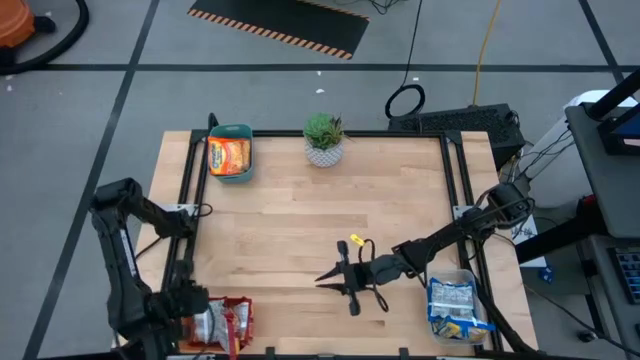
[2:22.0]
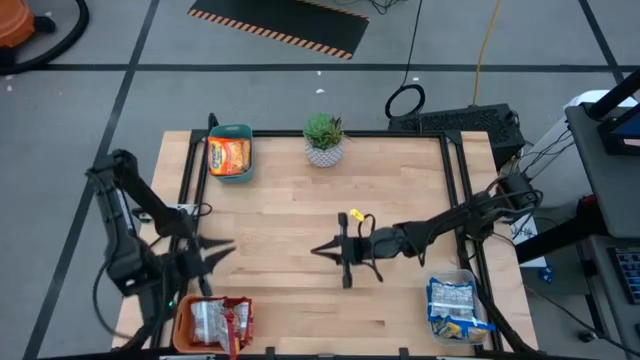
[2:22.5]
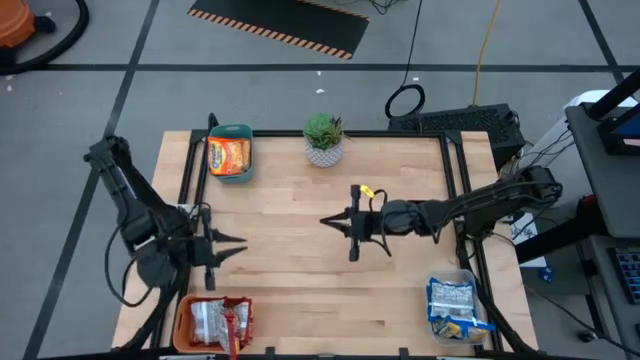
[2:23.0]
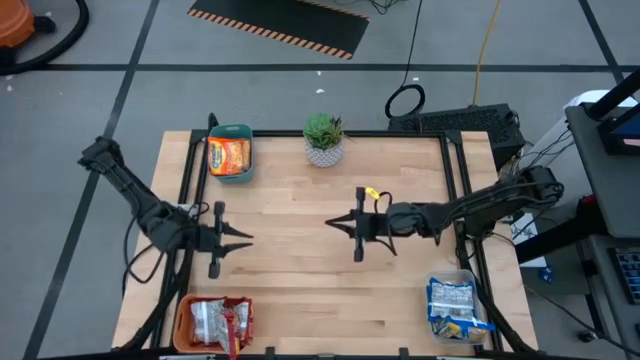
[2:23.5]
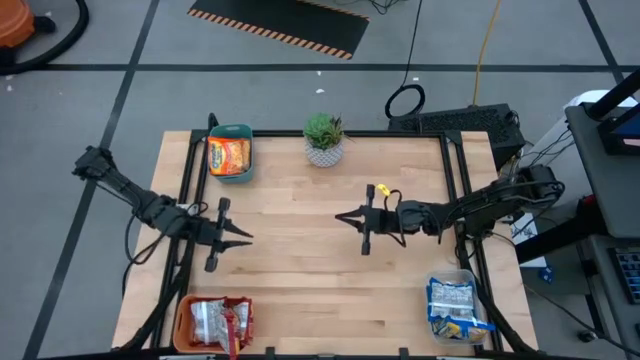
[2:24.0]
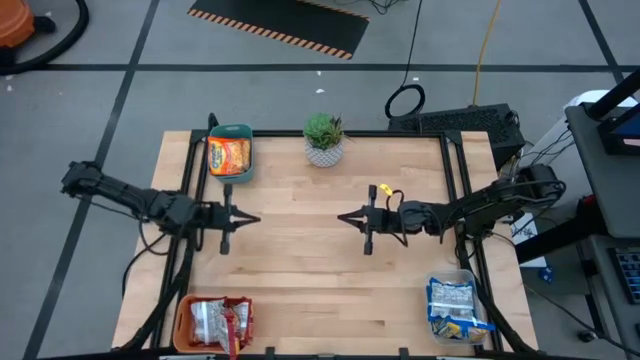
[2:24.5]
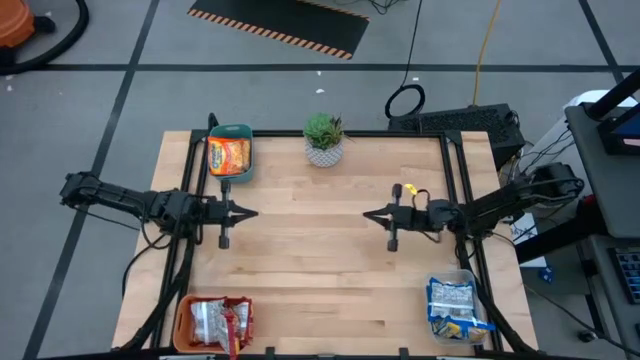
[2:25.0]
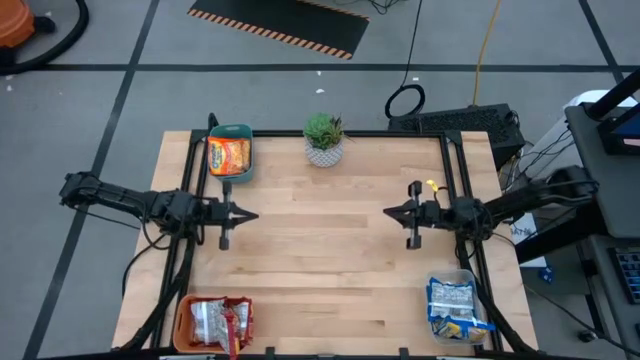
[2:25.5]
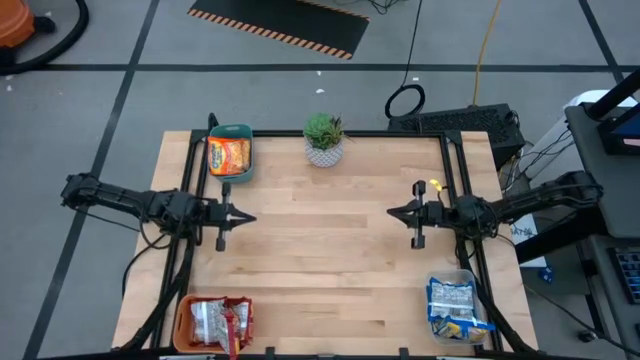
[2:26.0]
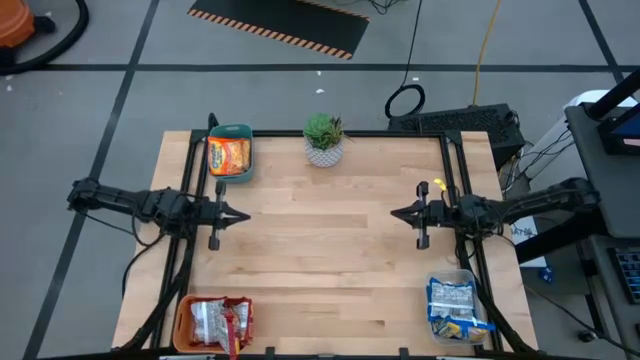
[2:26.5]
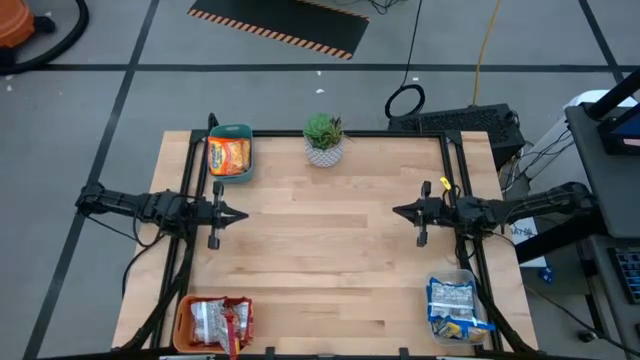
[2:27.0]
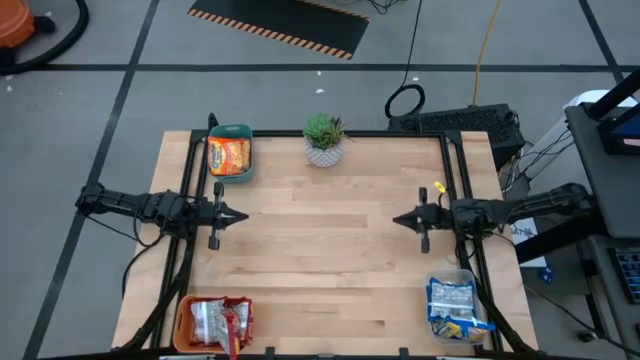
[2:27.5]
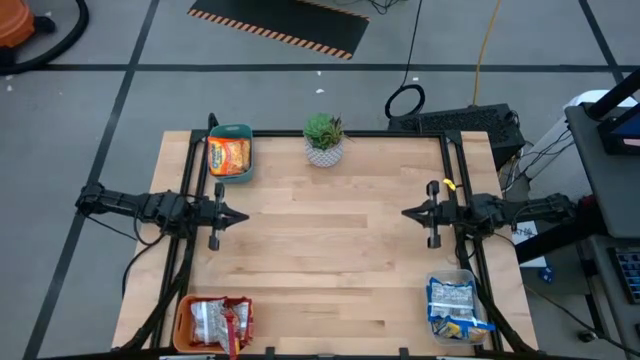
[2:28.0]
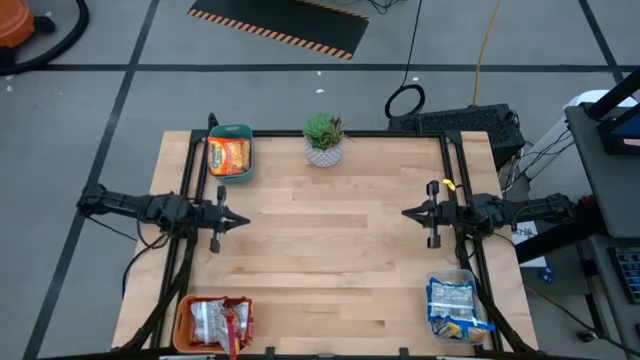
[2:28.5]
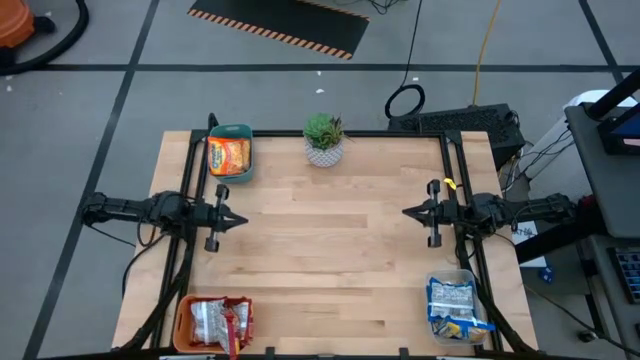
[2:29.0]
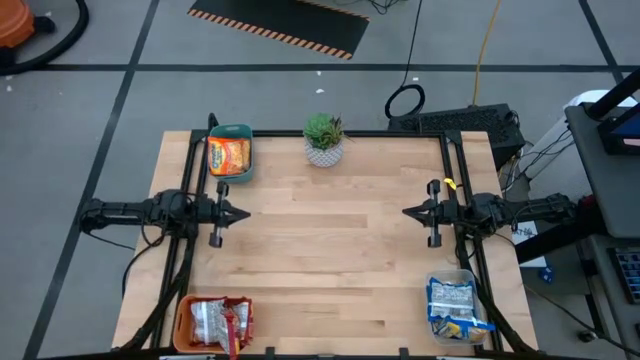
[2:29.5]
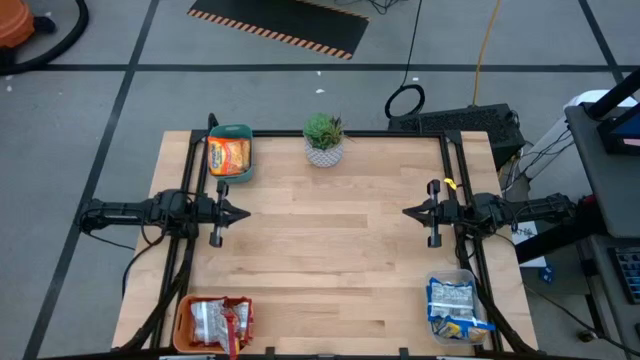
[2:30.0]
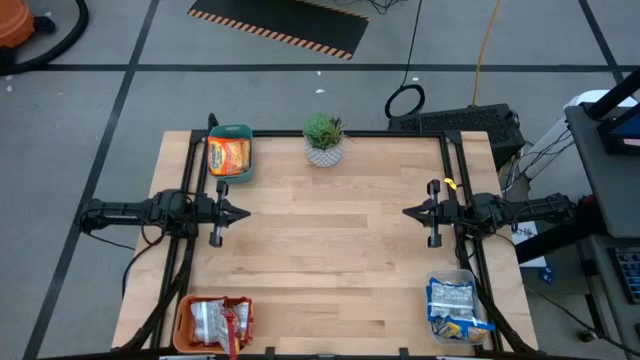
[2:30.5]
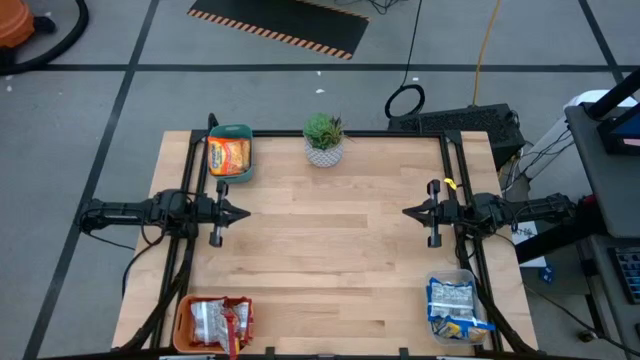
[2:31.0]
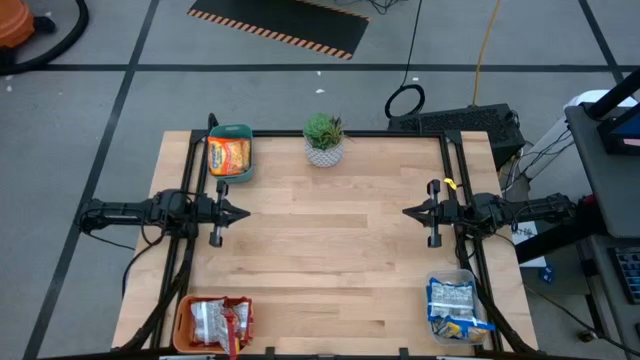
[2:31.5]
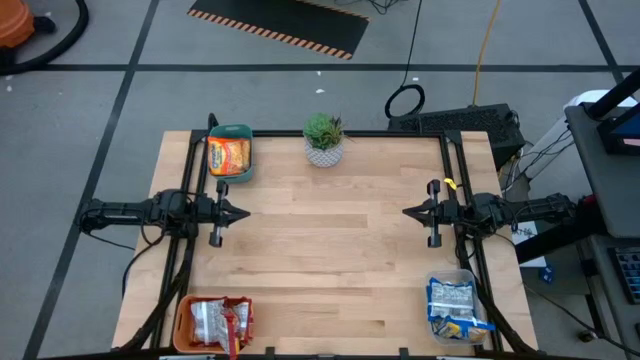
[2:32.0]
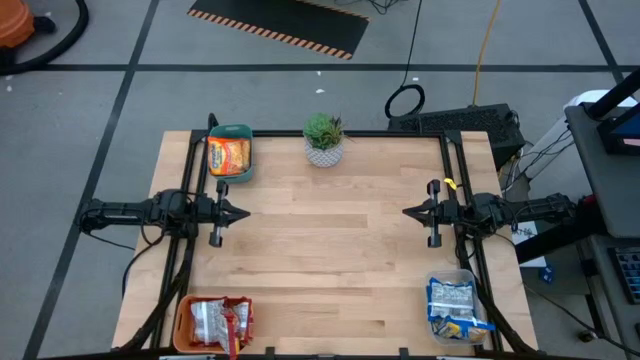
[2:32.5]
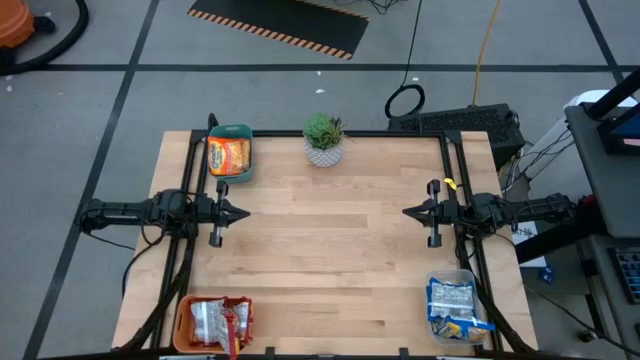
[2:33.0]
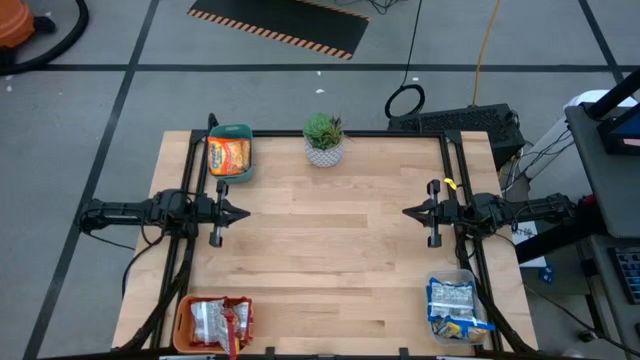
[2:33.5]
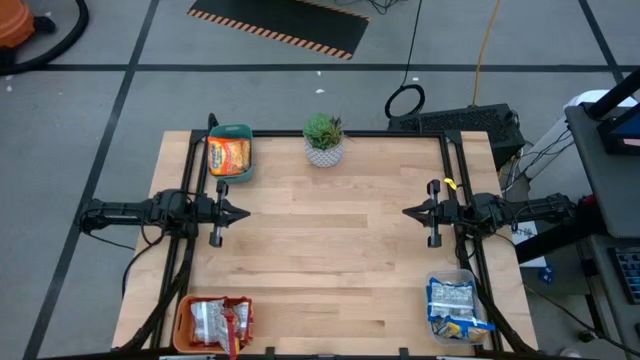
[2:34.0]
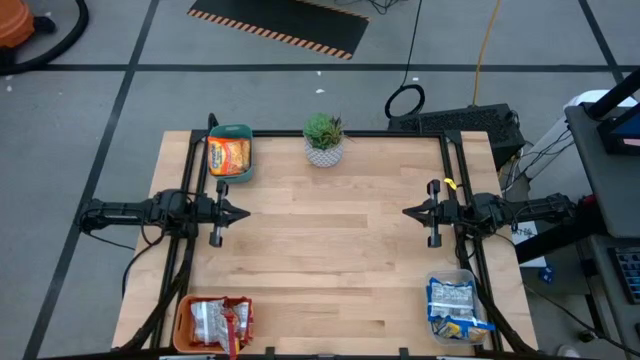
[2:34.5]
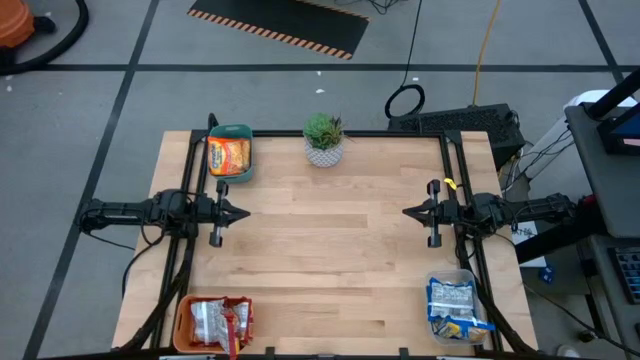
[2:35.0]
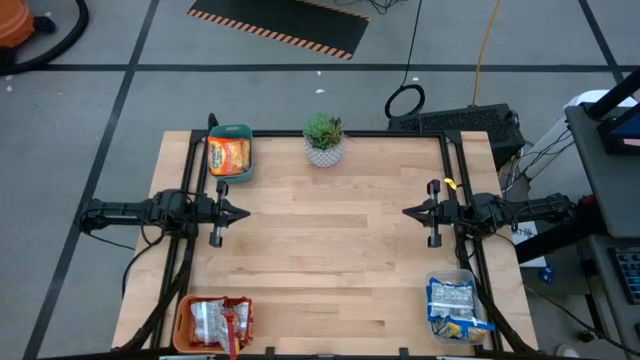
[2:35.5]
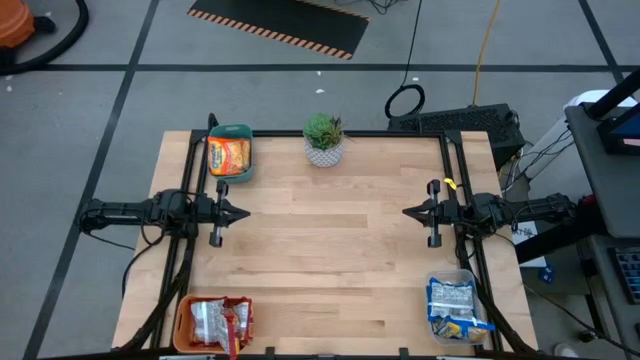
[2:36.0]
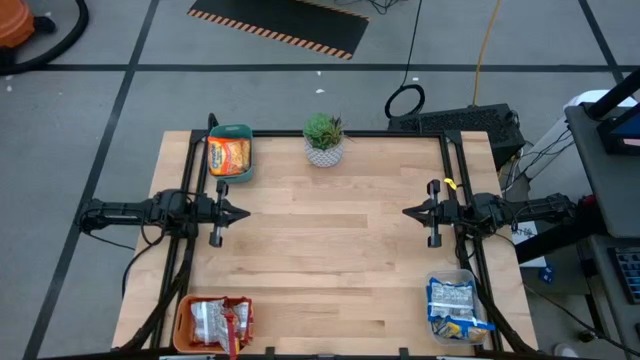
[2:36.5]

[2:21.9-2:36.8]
Task: Sort Maruchan noodles
Return to Home Position

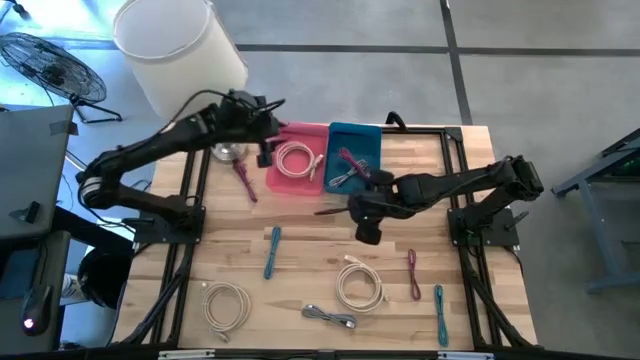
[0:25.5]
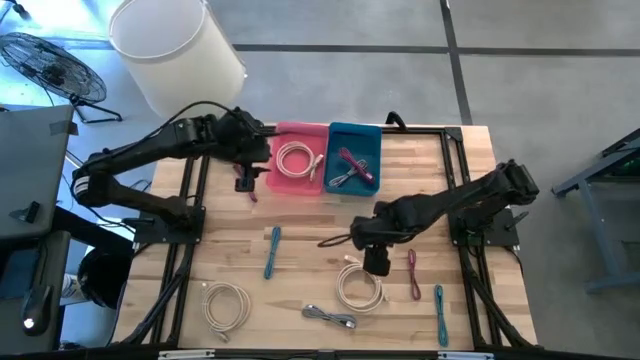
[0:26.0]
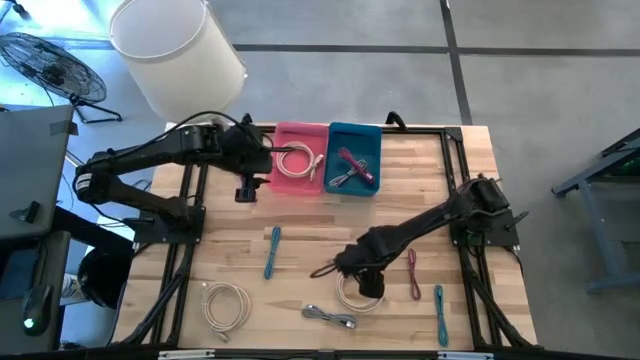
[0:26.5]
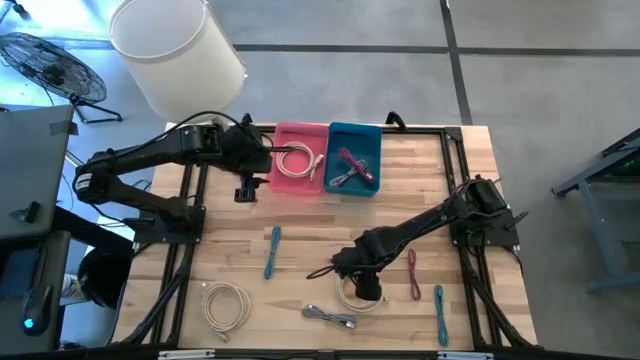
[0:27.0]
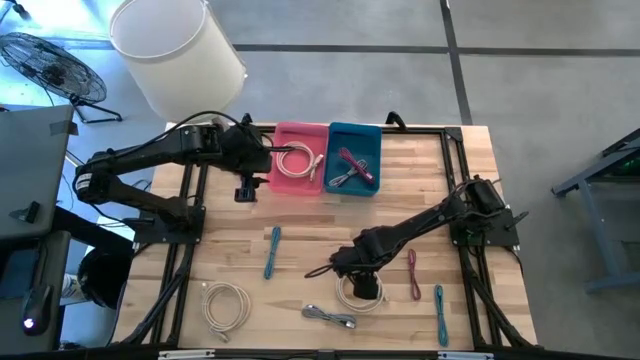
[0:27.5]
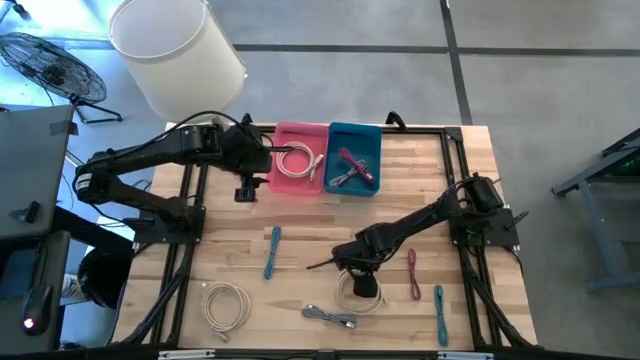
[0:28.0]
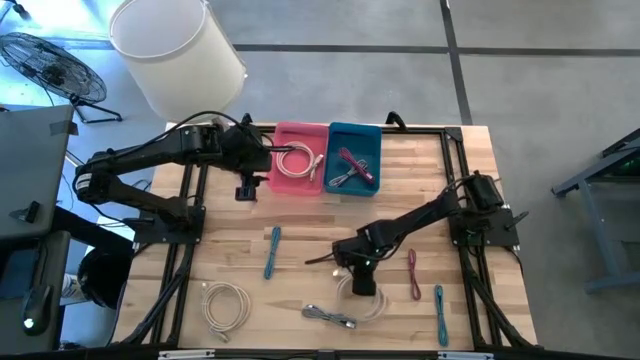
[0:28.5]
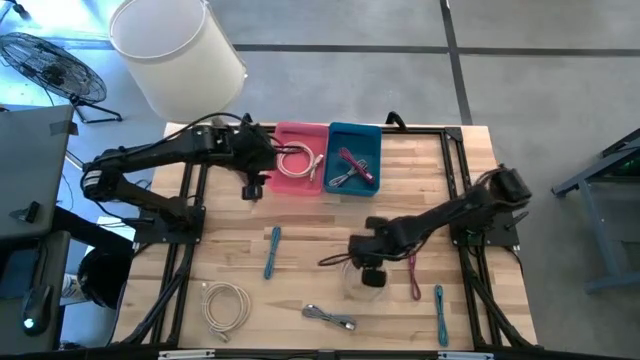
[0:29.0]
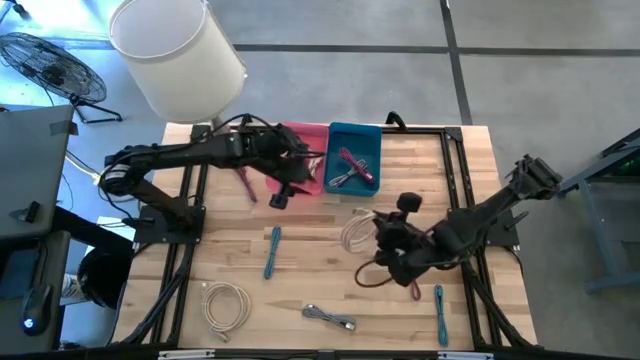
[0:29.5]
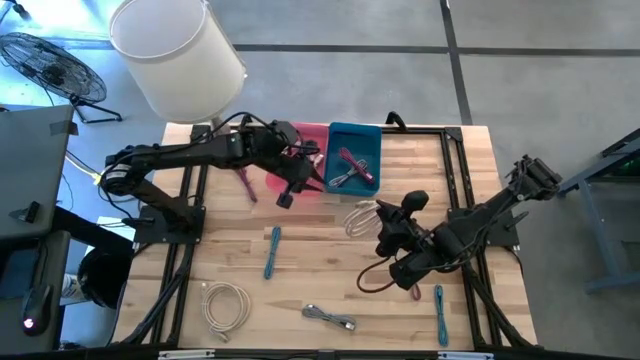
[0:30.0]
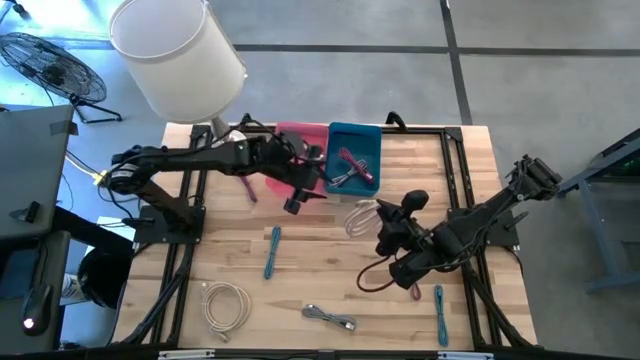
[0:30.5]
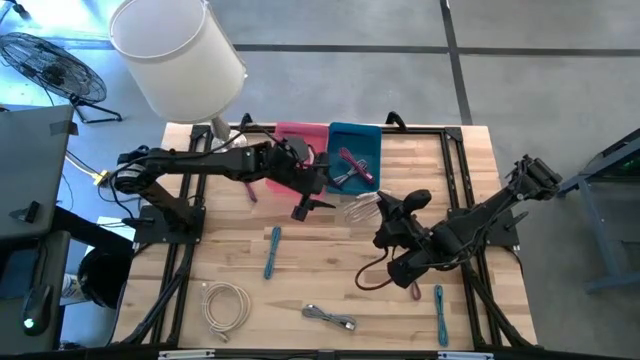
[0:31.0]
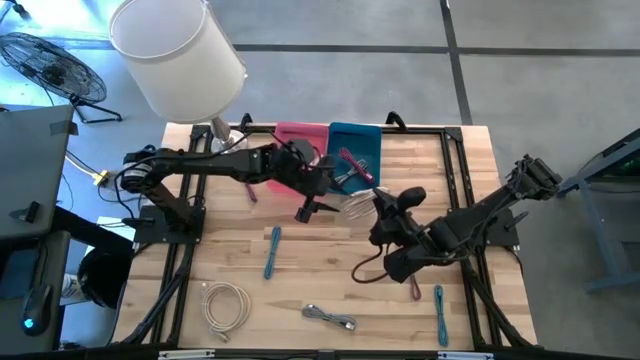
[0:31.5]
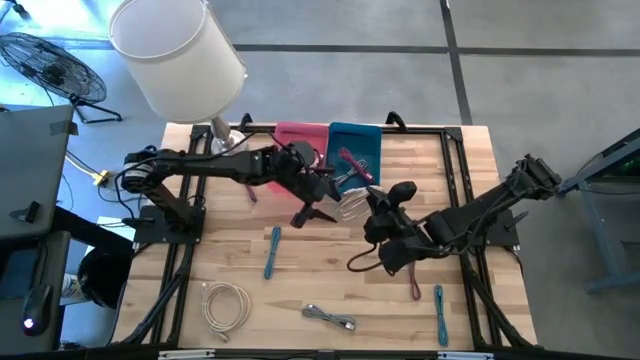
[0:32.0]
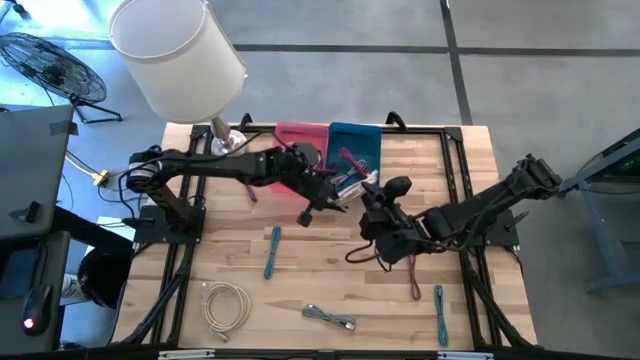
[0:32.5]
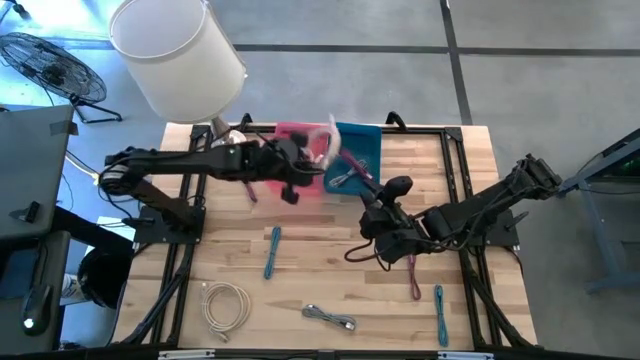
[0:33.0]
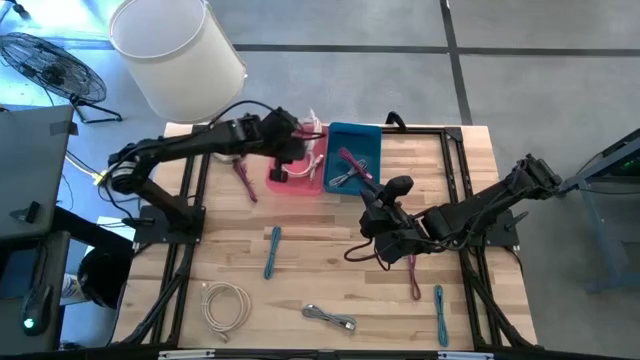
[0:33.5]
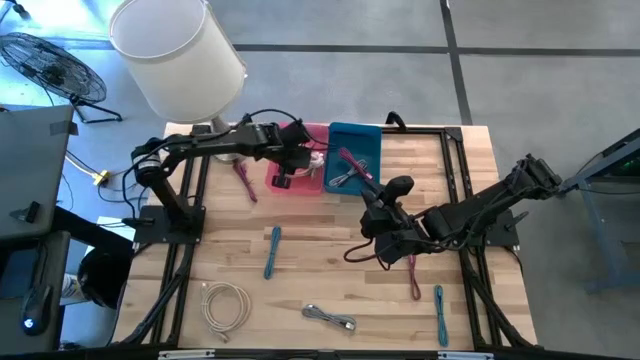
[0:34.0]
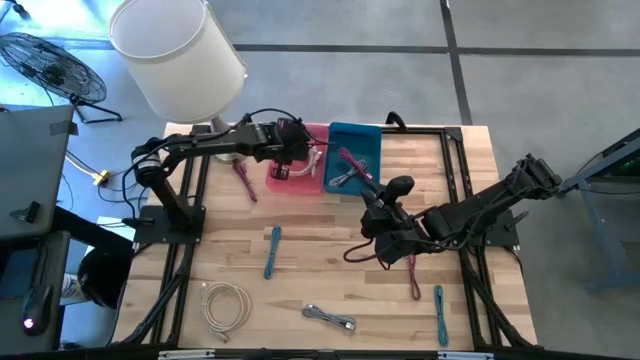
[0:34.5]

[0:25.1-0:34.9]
Task: Pick & Place USB Port
Put the right light brown hdmi cable into the pink bin
